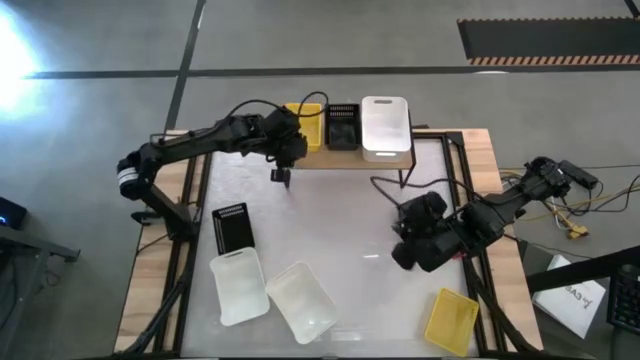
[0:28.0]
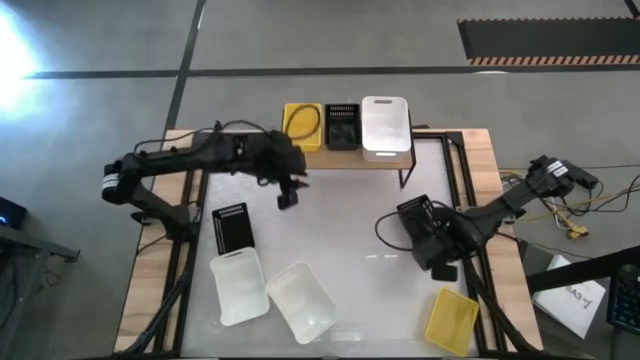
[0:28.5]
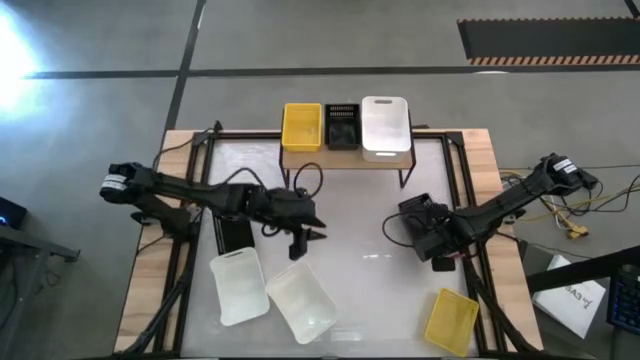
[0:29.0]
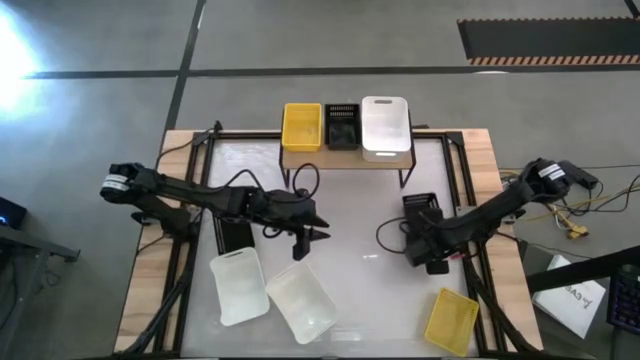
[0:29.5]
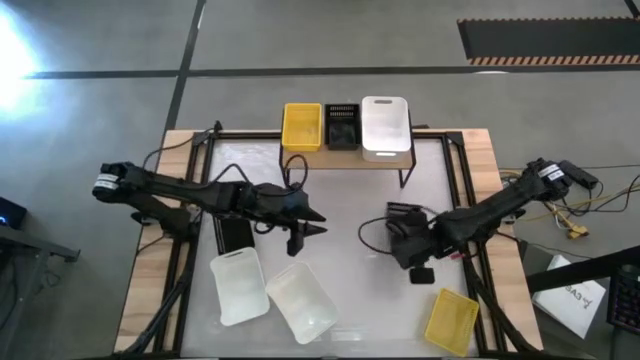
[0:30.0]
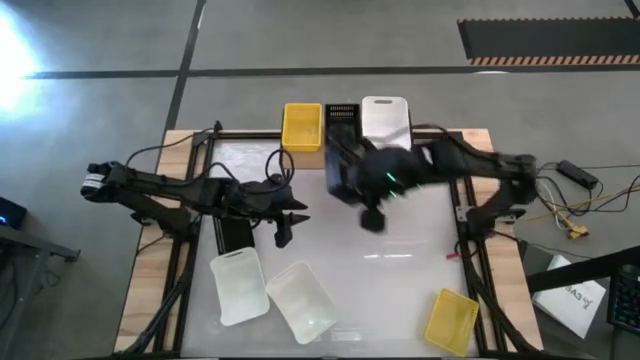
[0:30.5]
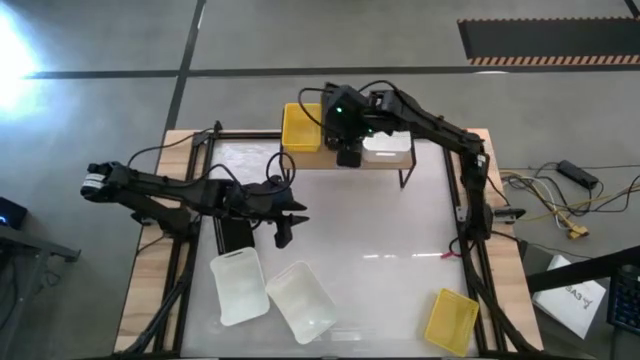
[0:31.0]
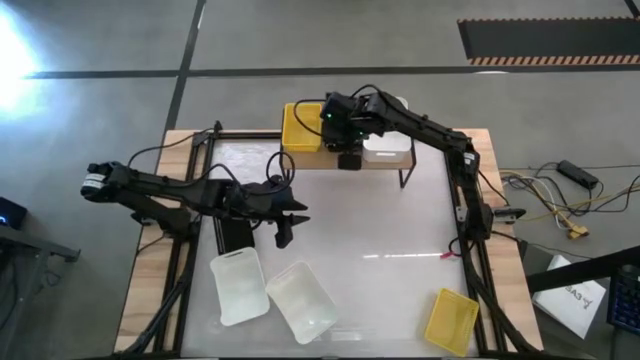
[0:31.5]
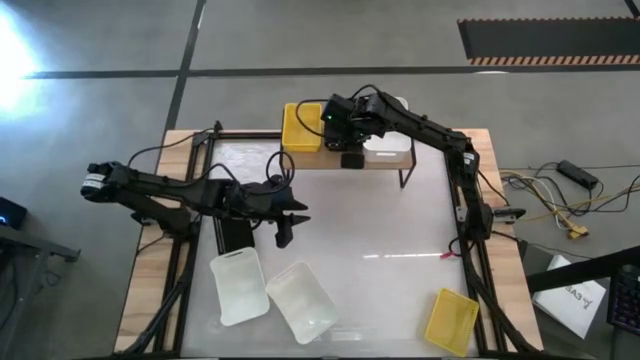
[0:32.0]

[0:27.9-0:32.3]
Task: Stack baskets on shelf by color
Stack the right black bin on top of the black bin on the shelf

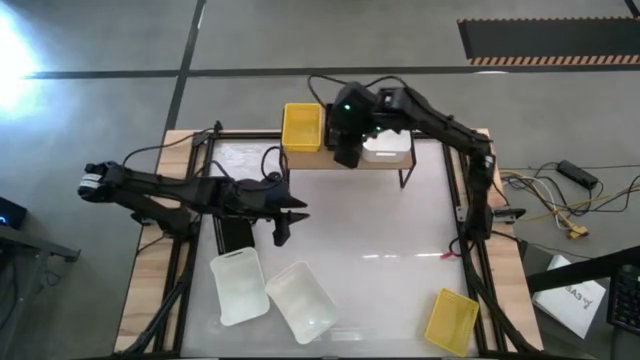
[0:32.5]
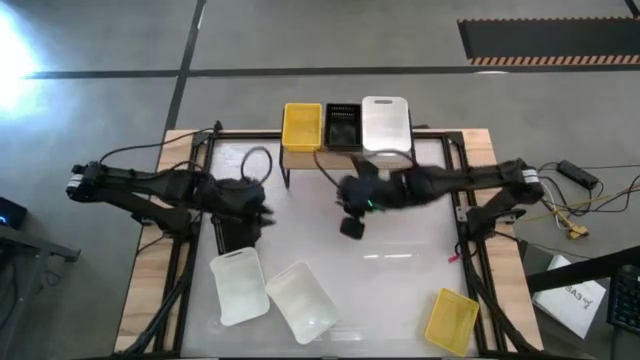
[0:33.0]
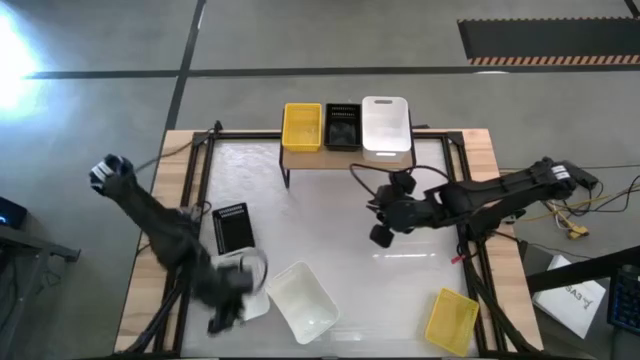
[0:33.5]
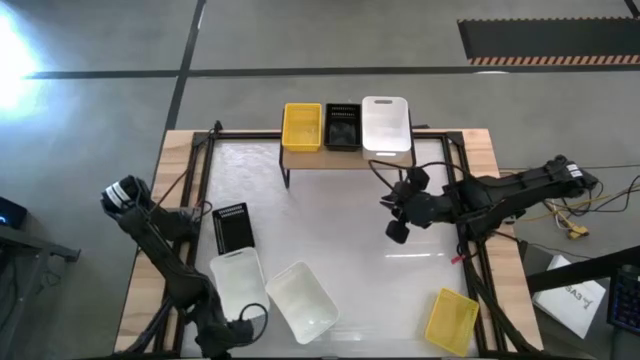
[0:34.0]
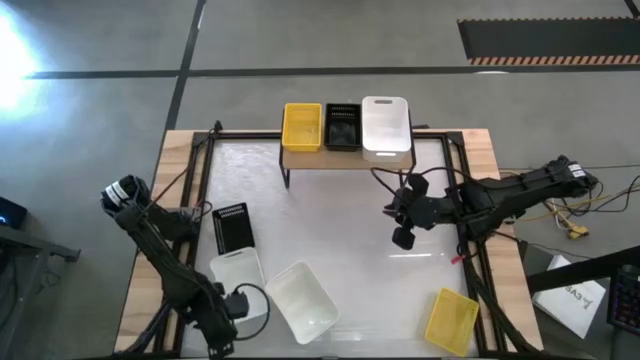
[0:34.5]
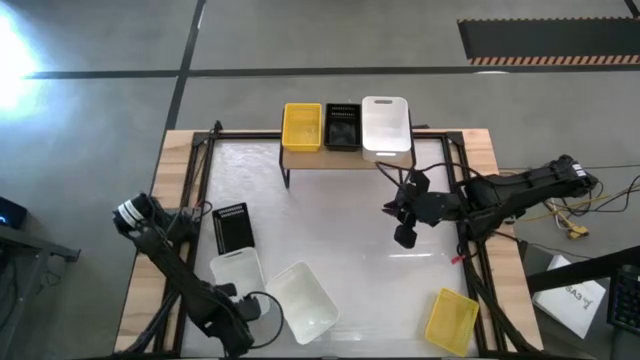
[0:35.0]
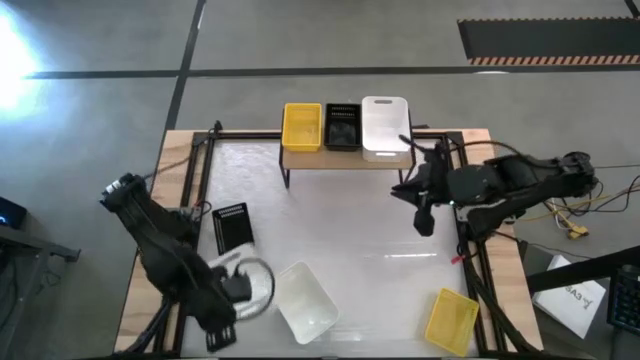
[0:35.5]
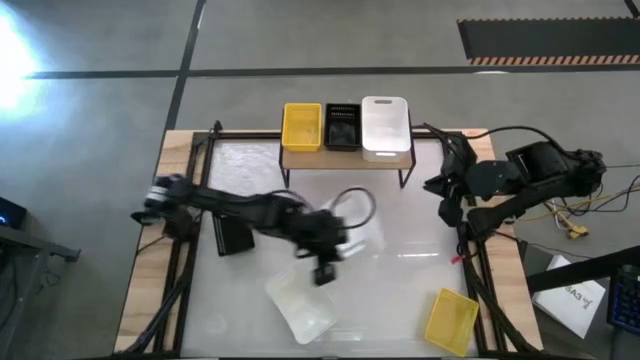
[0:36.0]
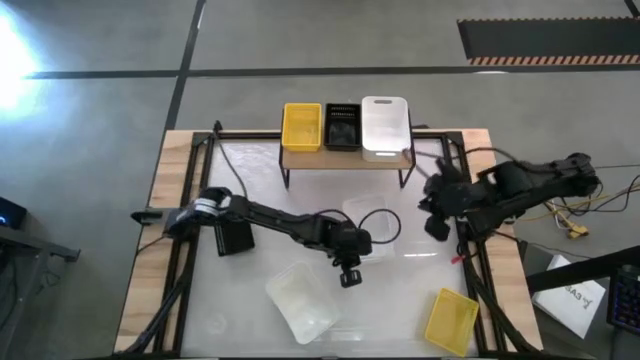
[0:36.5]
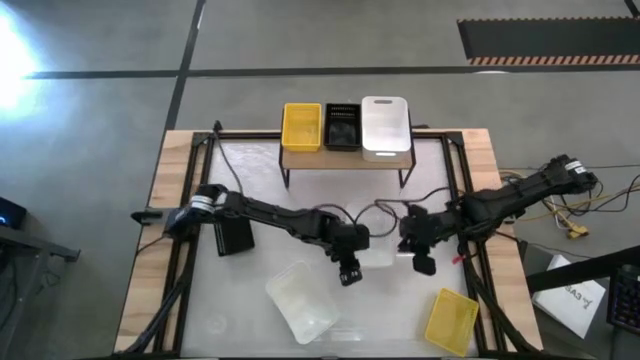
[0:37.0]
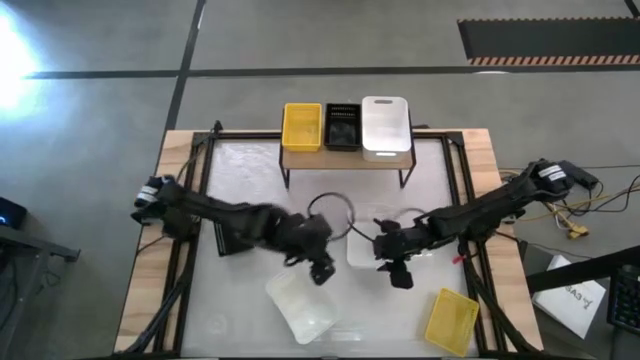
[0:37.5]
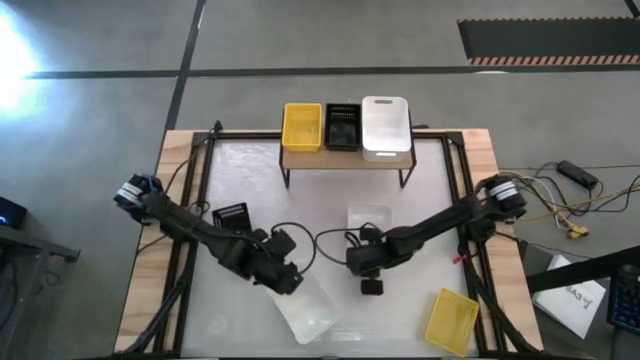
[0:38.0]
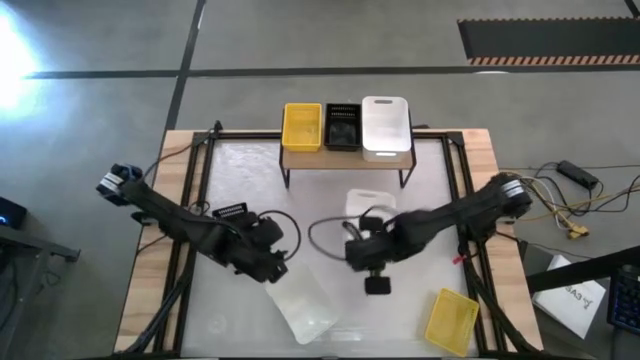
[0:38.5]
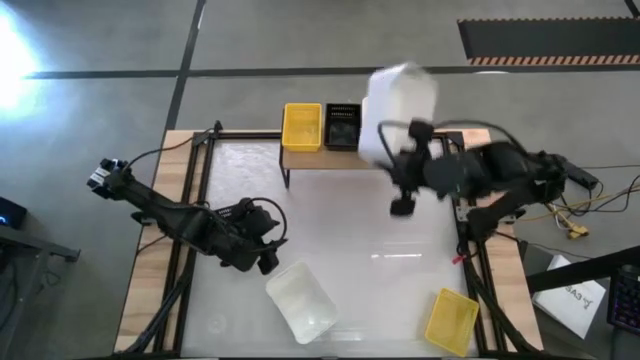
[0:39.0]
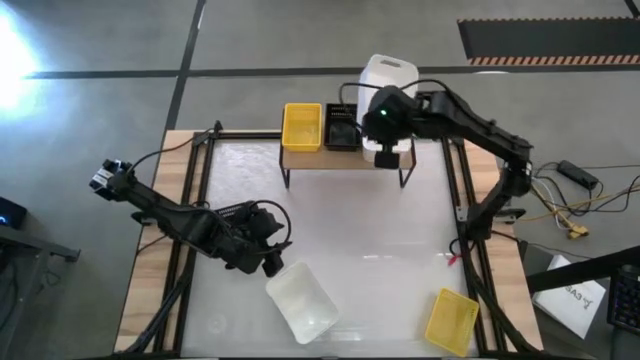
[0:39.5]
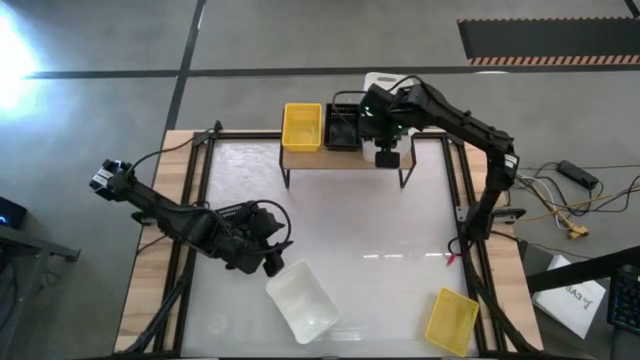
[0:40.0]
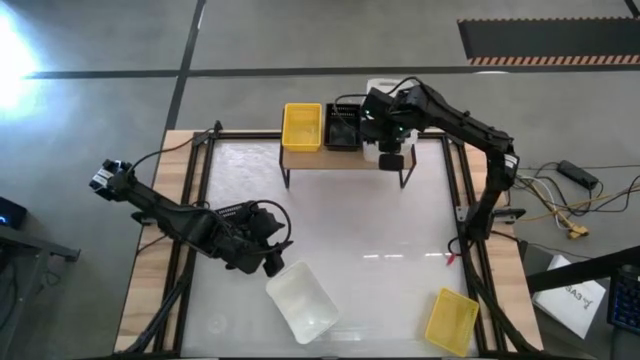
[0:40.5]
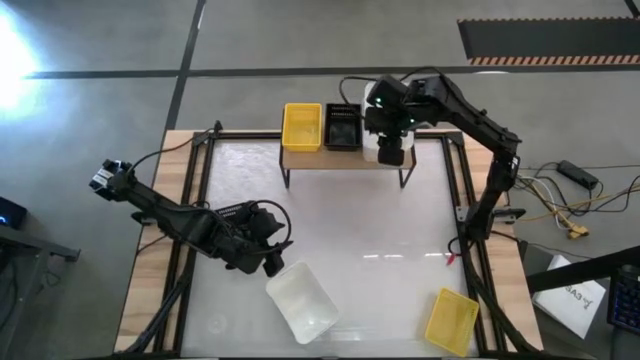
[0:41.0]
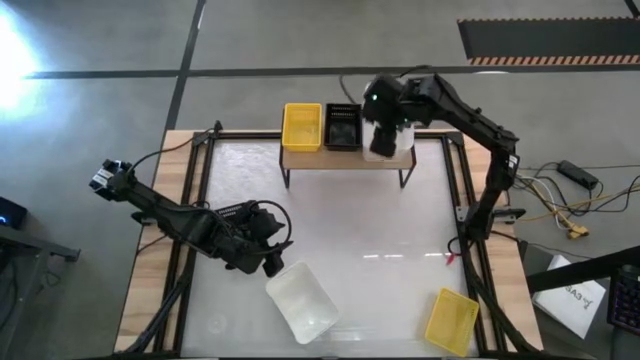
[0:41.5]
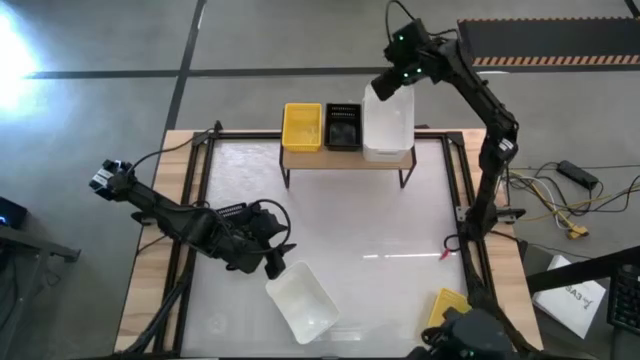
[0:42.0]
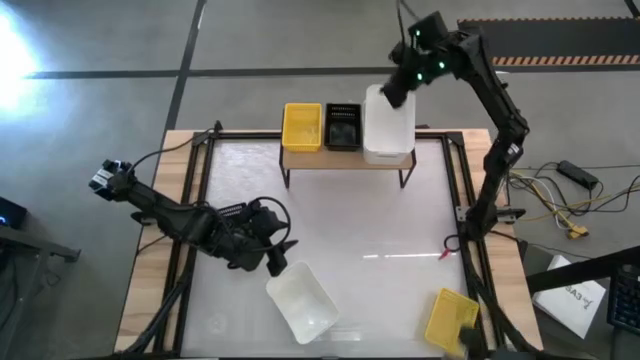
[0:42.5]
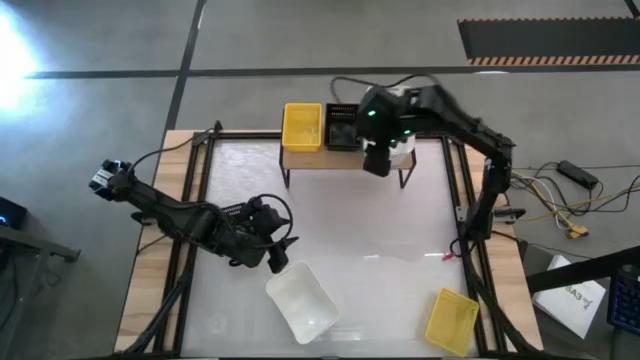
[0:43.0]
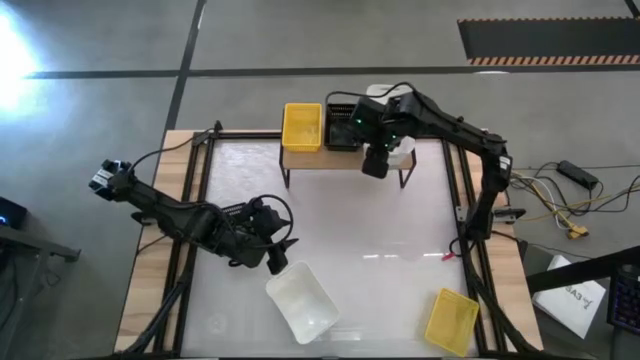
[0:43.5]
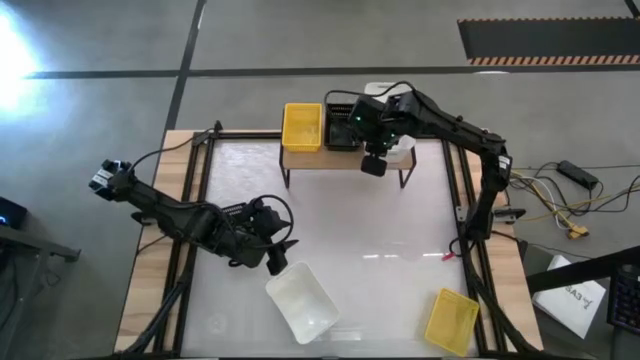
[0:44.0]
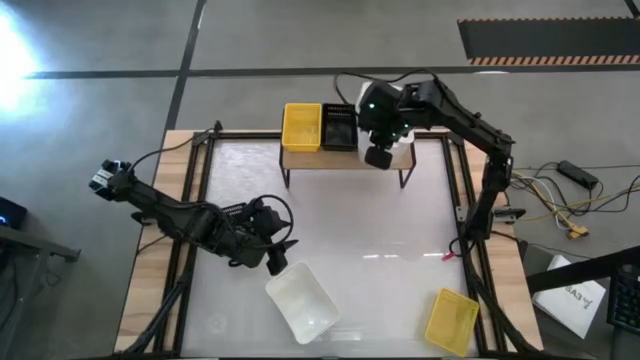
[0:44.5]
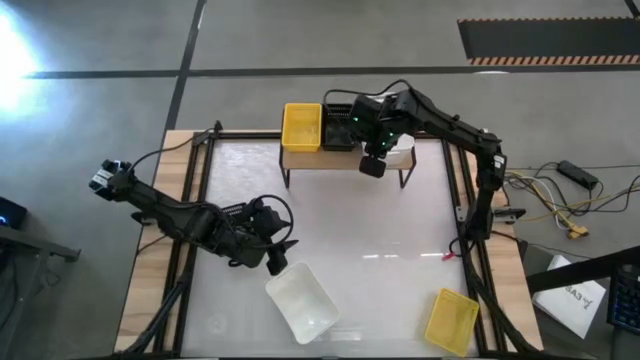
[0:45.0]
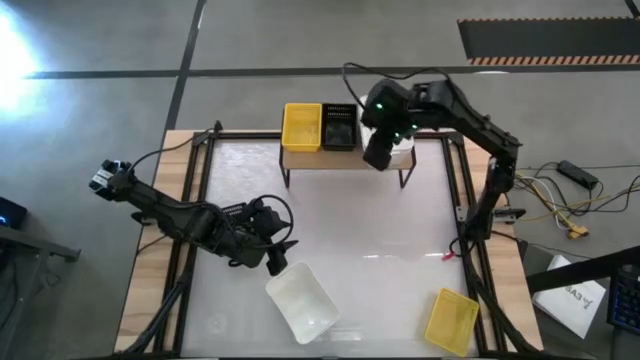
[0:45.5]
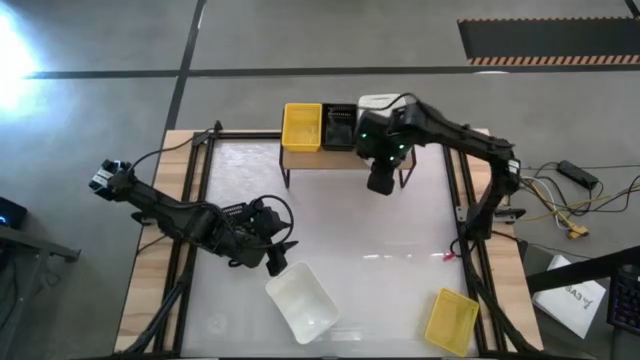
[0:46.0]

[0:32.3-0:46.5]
Stack the left white bin on top of the white bin on the shelf

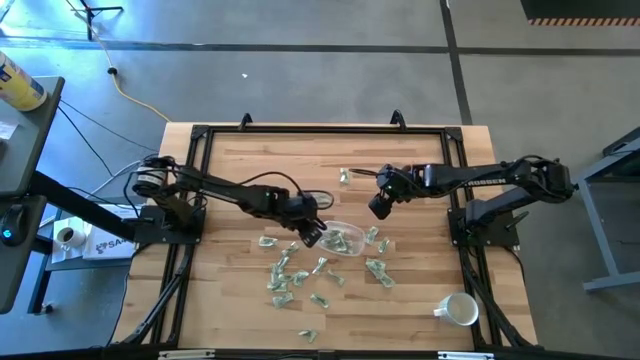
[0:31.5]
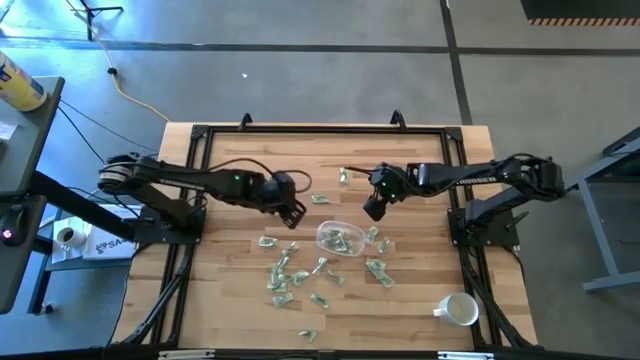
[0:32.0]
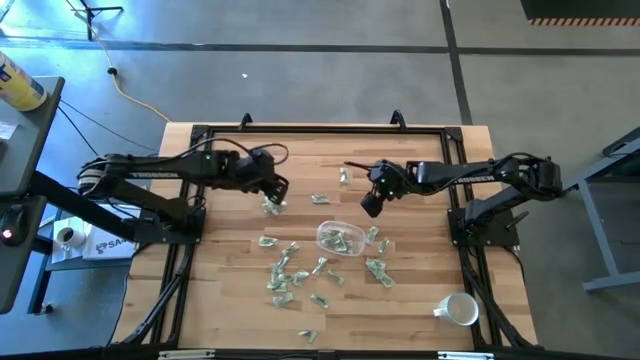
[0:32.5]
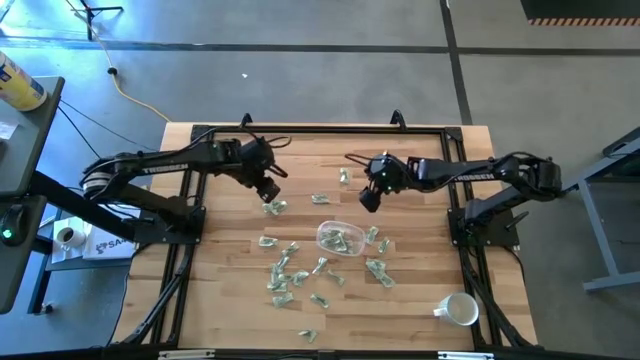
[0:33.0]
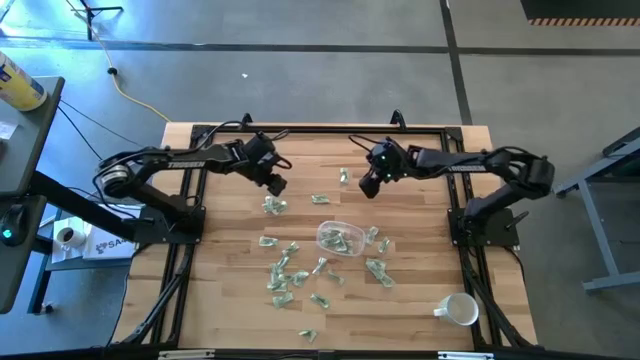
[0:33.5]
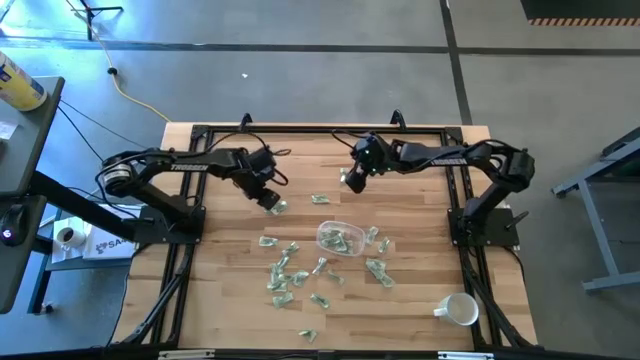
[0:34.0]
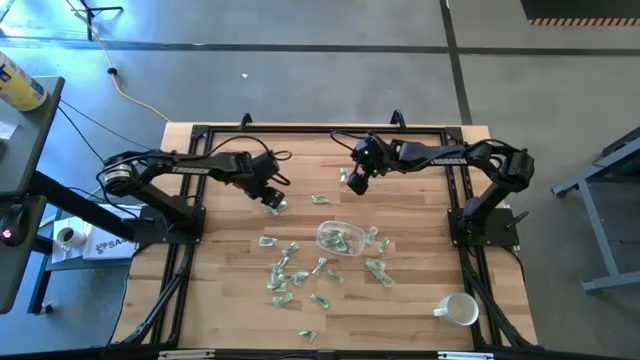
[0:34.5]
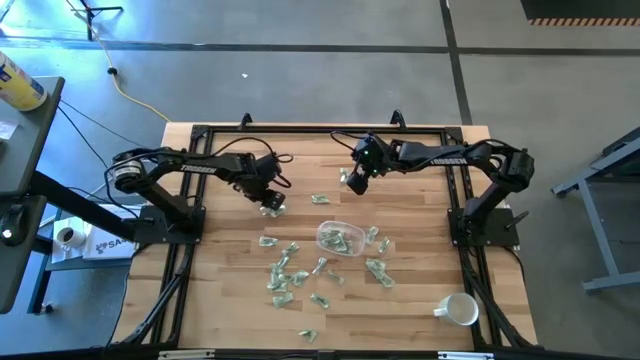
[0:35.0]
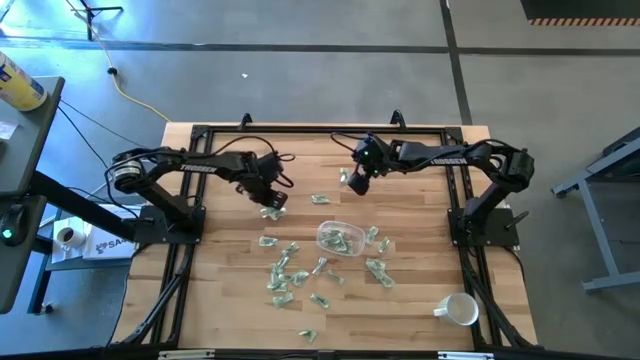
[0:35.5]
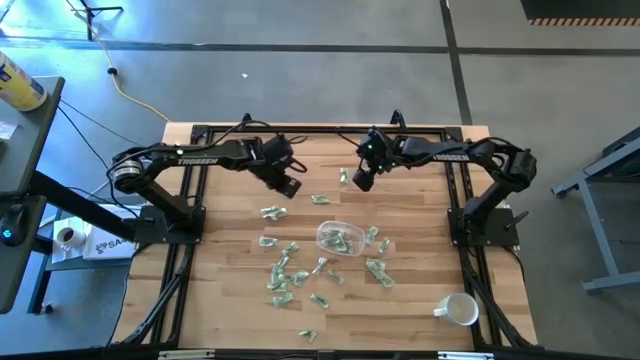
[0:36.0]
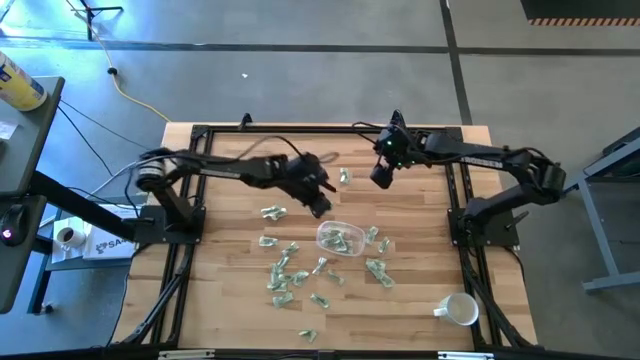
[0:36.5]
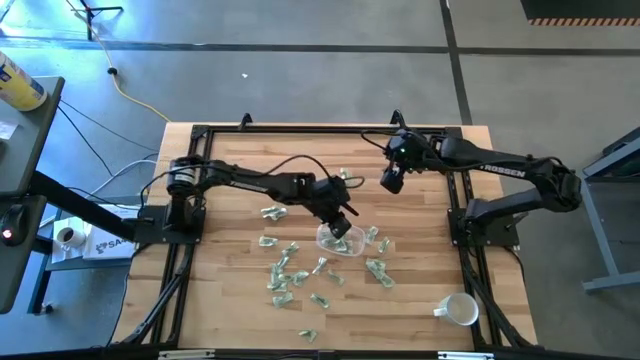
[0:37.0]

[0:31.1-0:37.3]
Task: Pick and place Stevia / Truvia into bins
Put the green stevia packet into the transparent container
